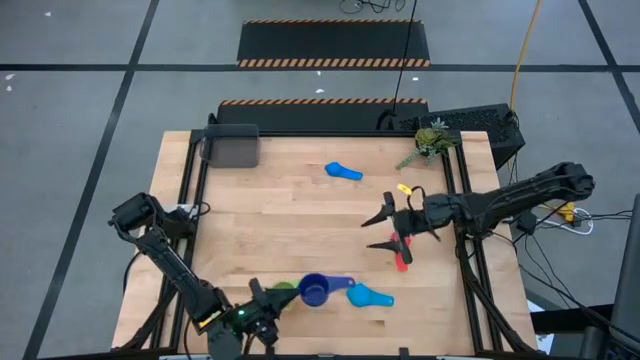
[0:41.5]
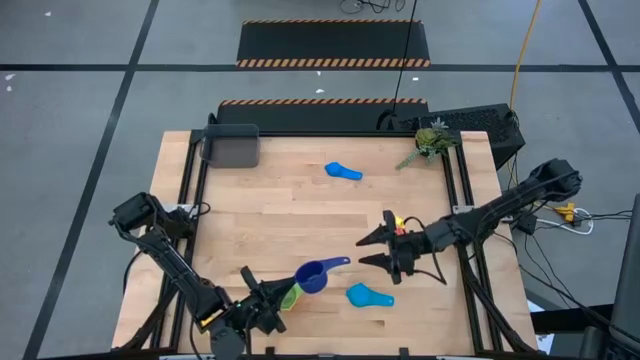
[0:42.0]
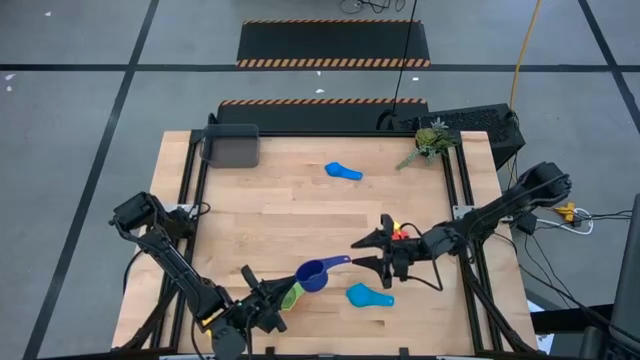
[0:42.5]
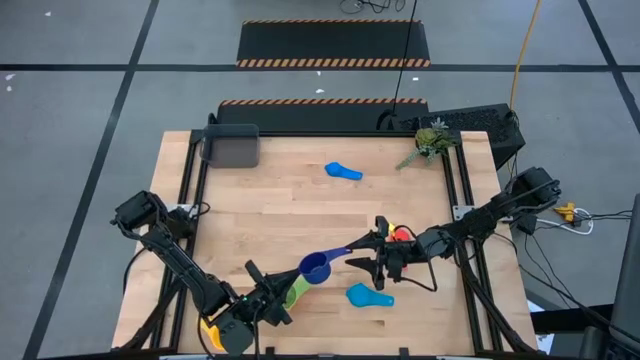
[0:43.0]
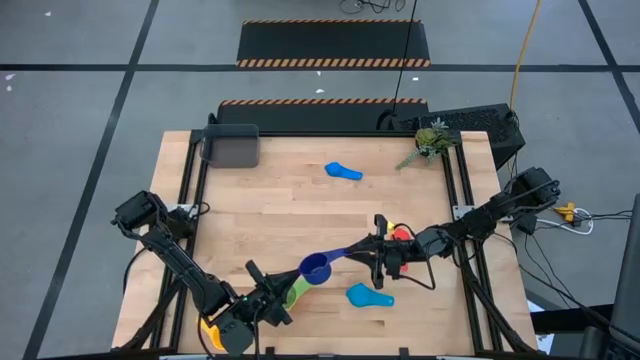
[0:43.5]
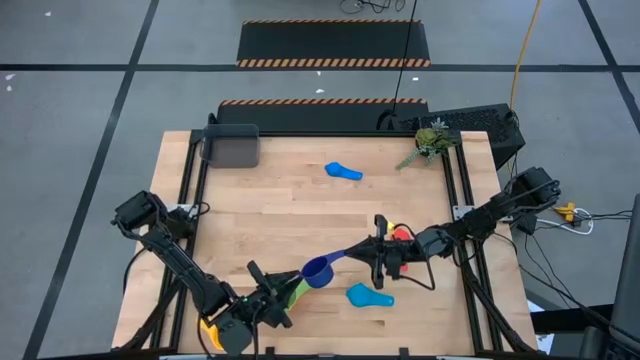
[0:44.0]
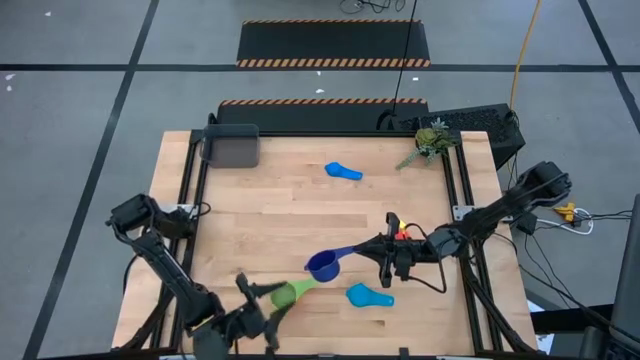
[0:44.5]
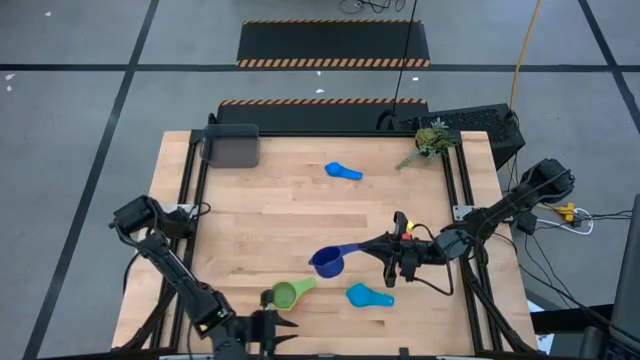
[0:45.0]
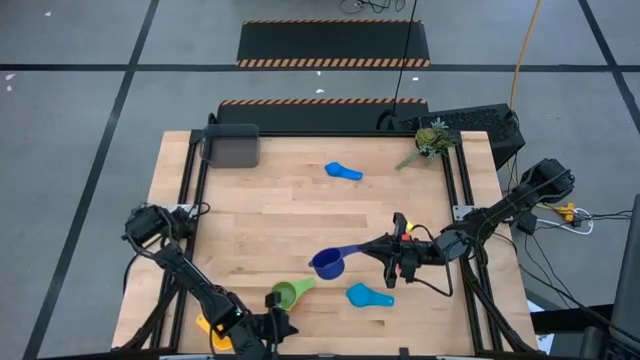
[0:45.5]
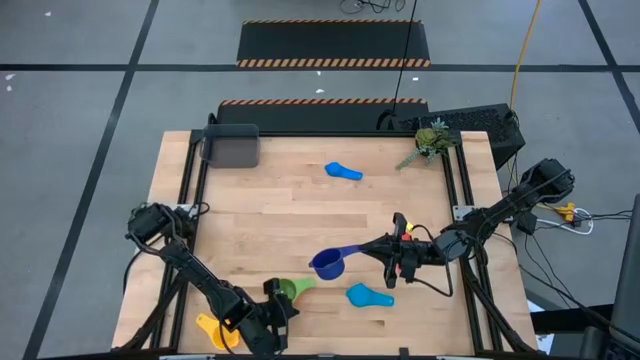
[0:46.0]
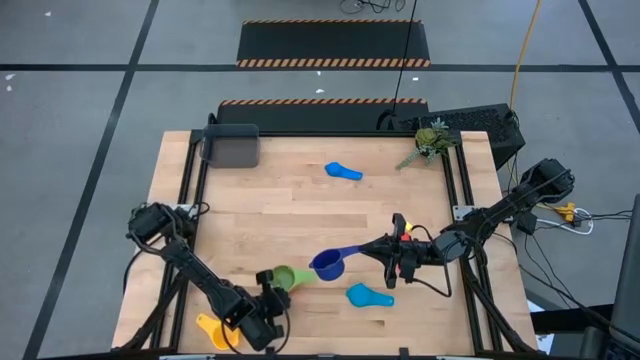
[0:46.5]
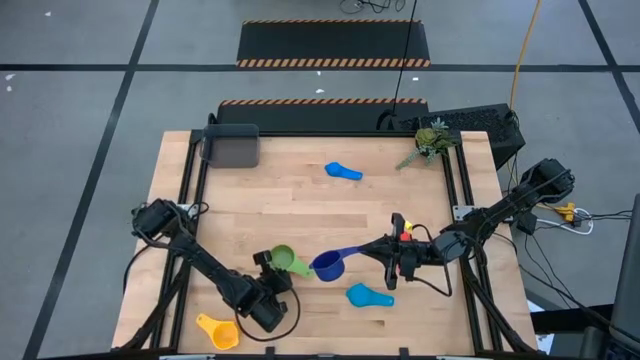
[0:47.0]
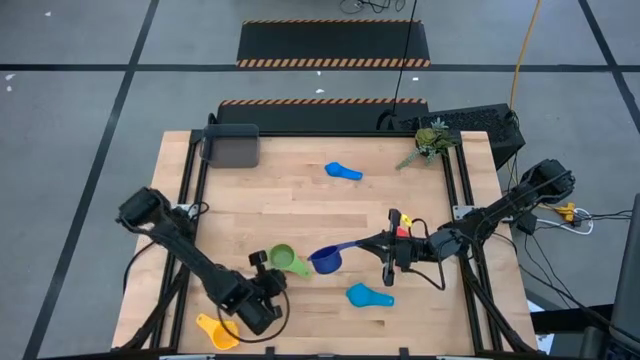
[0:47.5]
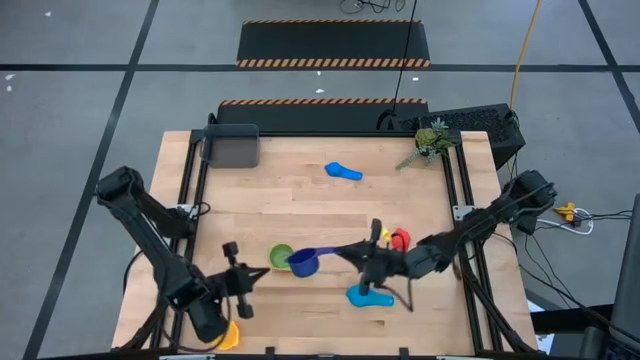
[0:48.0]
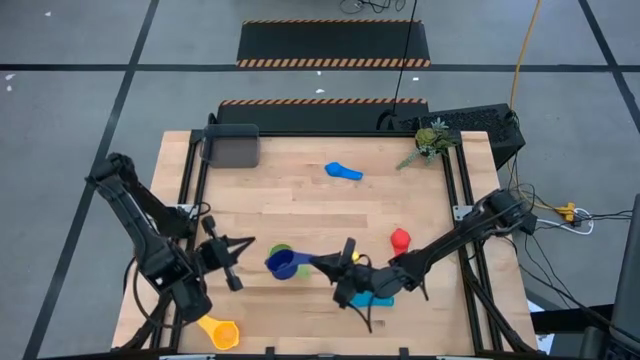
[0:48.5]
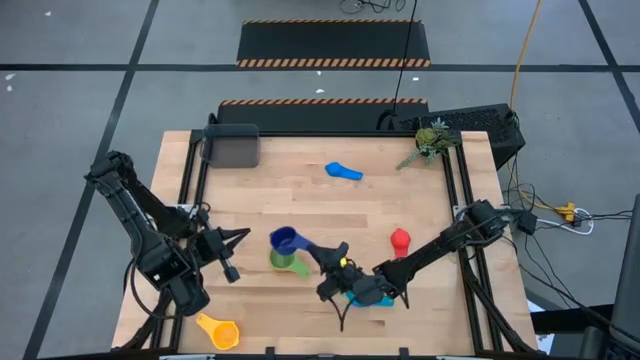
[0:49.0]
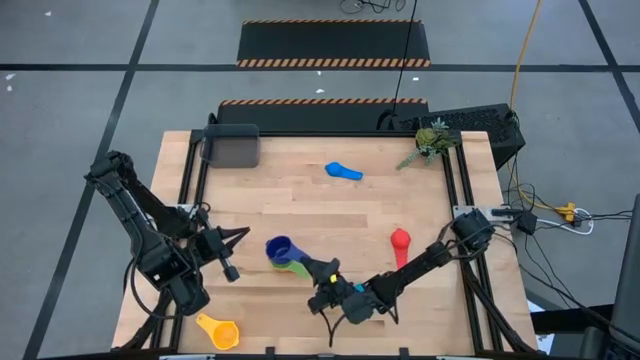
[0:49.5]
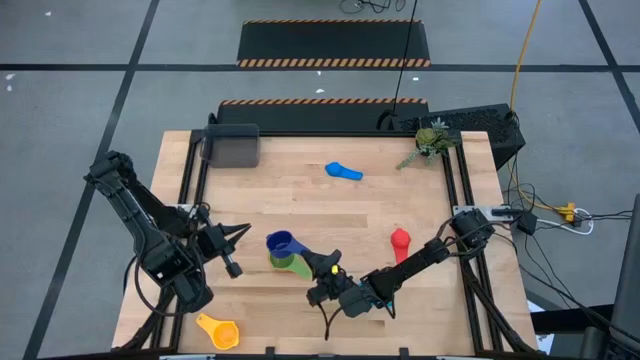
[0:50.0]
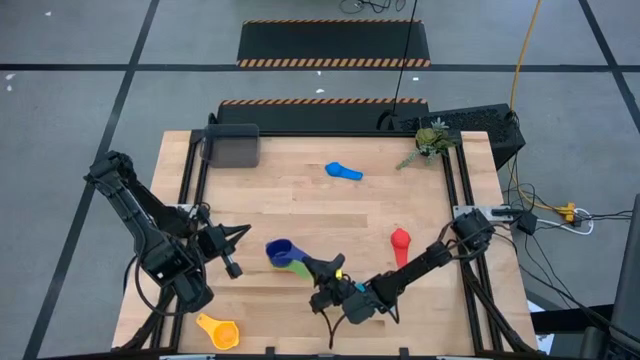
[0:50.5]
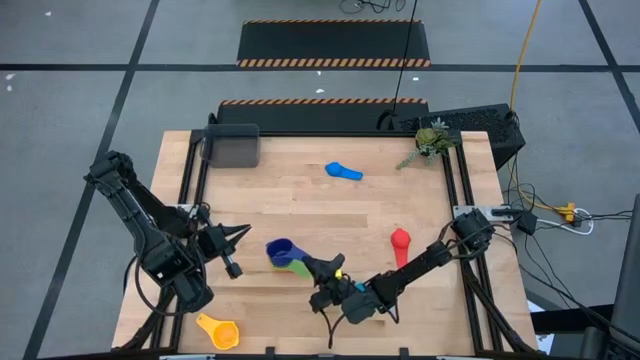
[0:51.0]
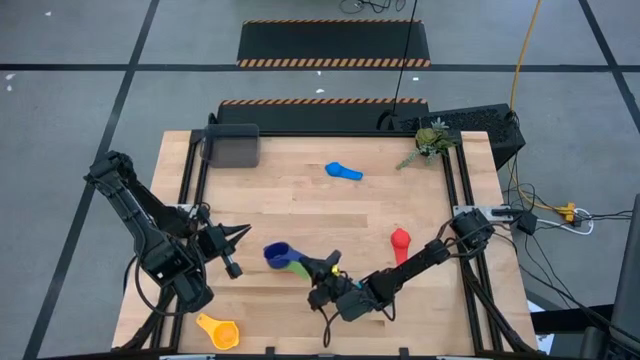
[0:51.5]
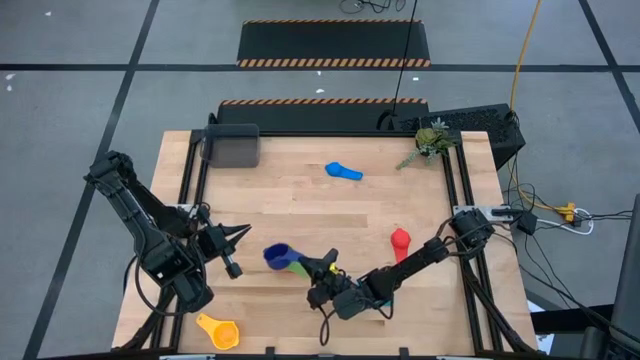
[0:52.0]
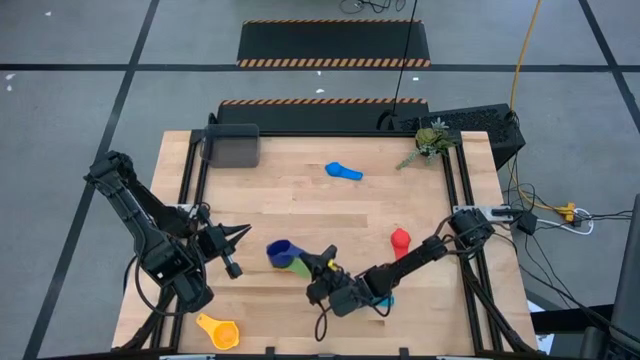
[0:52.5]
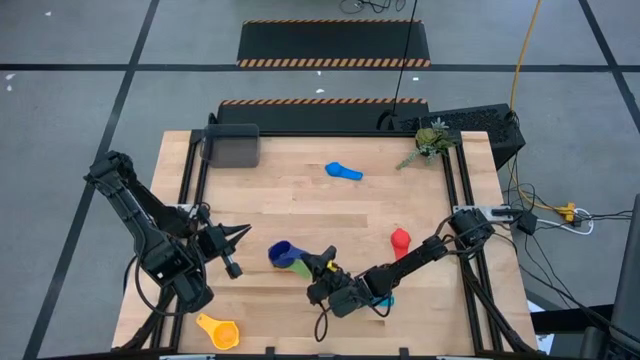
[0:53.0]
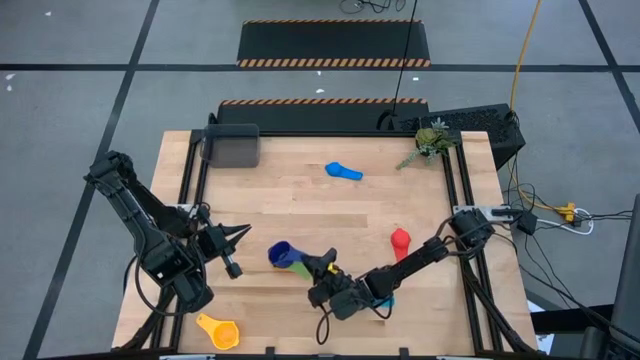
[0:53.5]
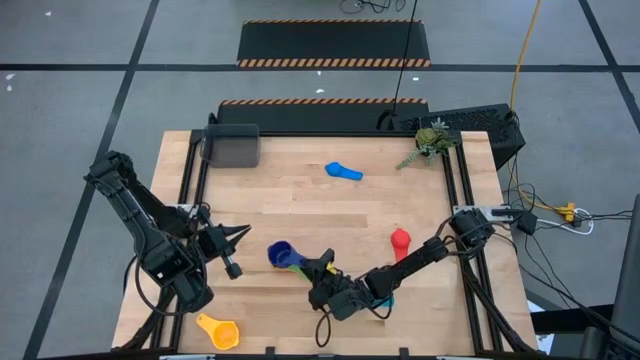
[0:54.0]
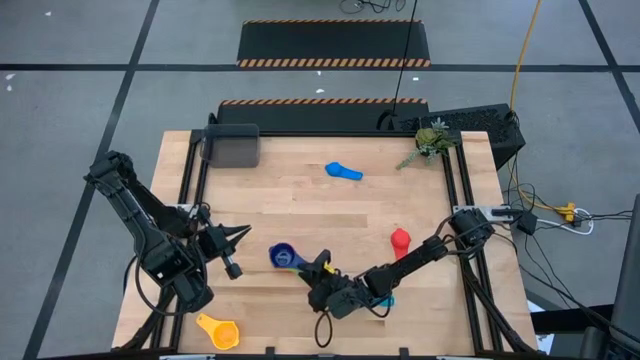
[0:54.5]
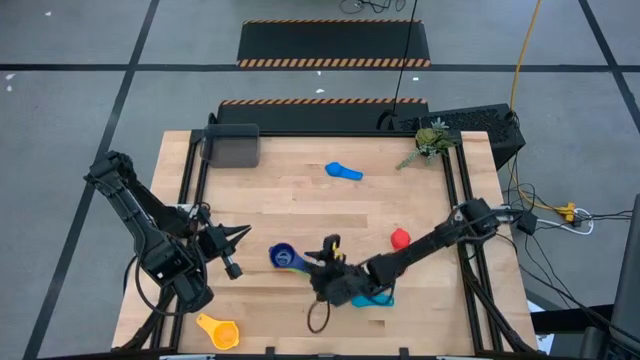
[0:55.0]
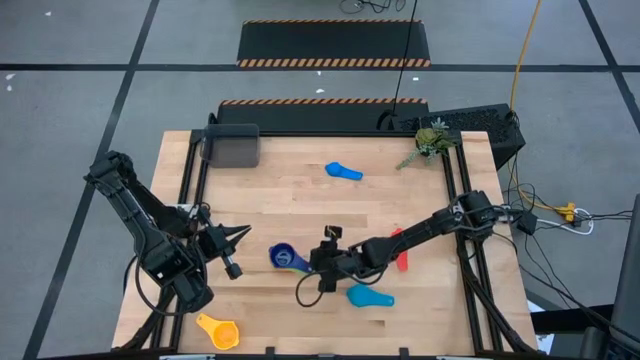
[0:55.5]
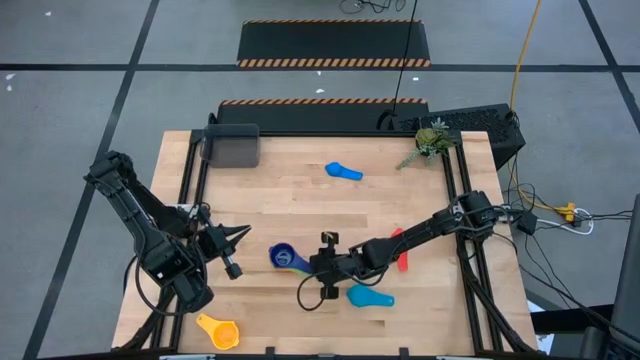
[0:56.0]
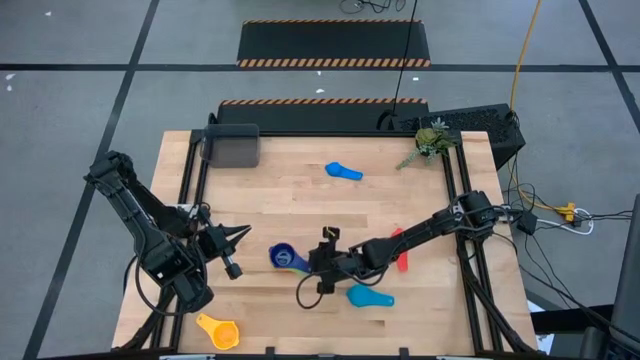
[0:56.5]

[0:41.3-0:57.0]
Task: Nest measuring cups in basket
Stack the purple measuring cup on top of the green measuring cup

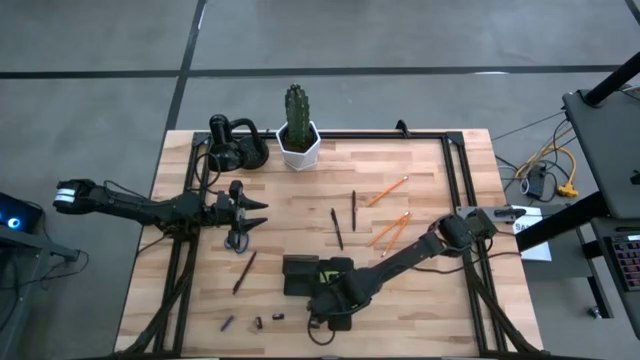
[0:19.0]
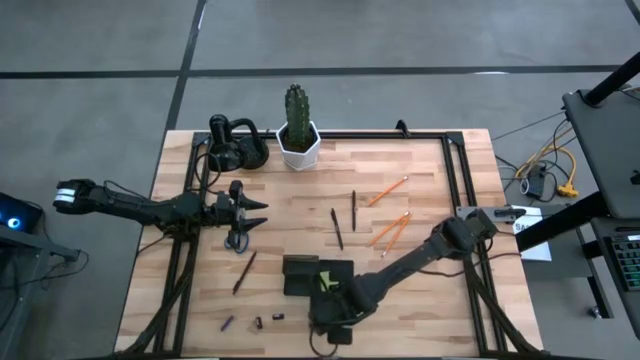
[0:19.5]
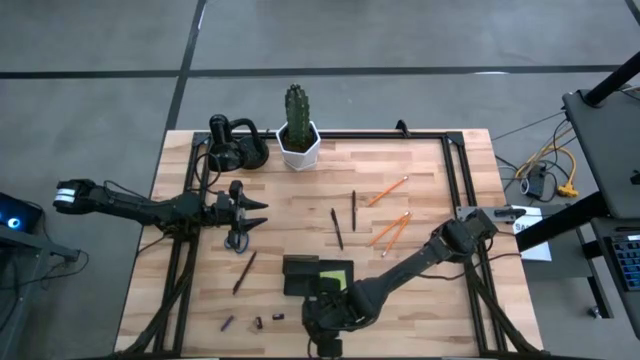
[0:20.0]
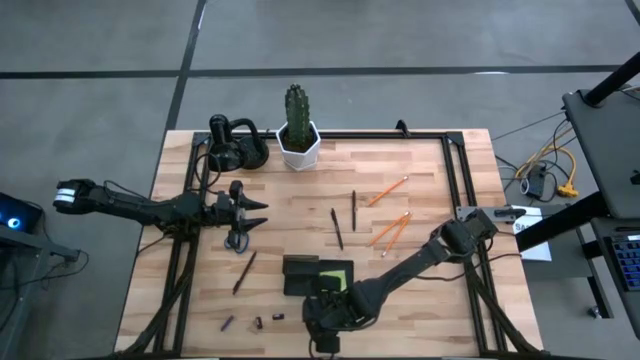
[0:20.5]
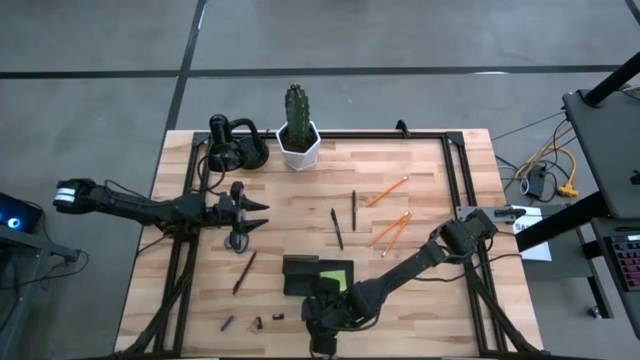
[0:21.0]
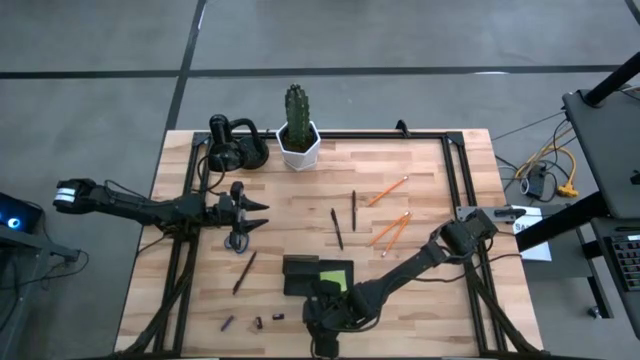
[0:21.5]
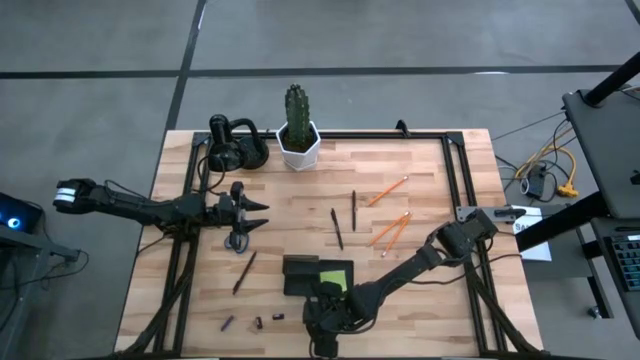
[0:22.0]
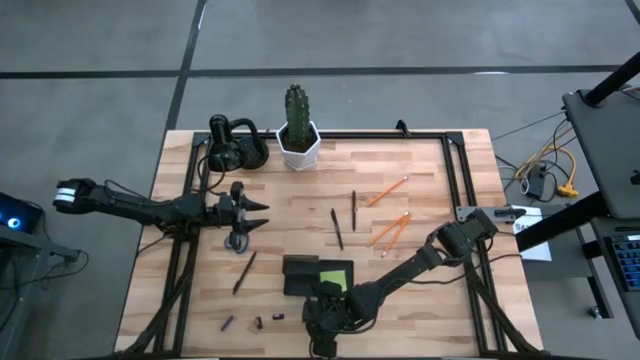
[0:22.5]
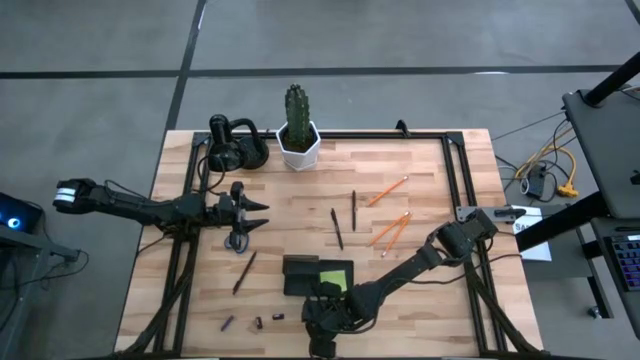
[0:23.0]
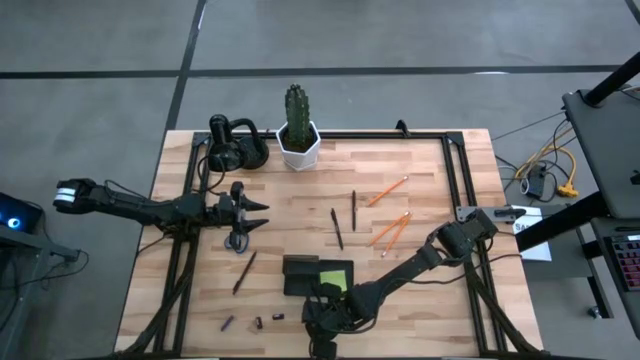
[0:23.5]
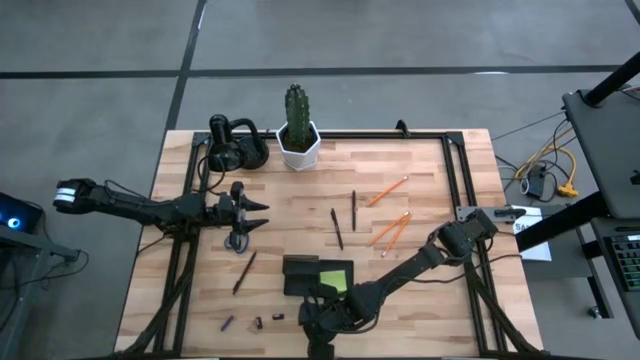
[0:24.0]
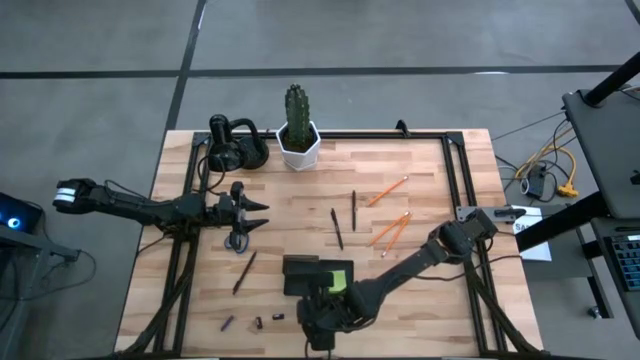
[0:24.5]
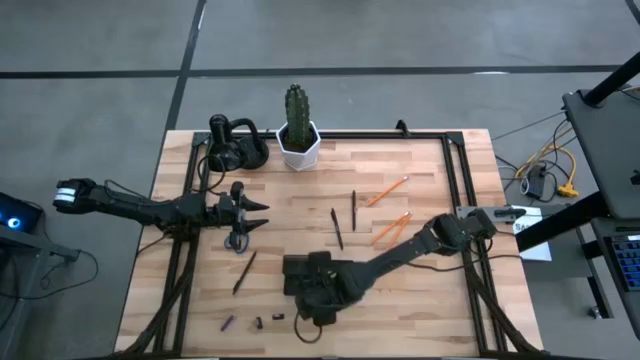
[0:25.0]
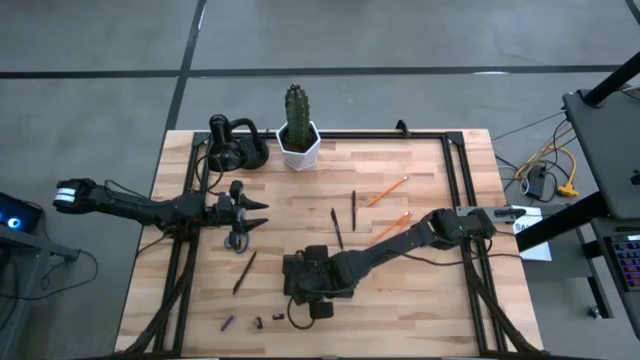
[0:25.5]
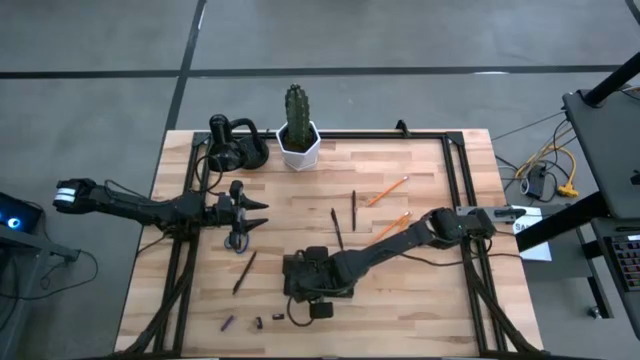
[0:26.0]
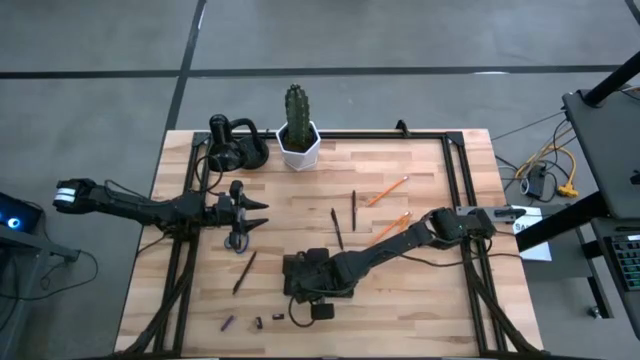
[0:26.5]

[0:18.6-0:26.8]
Task: Pick and place office supplies into organizer
Put the right binder clip into the desk organizer
